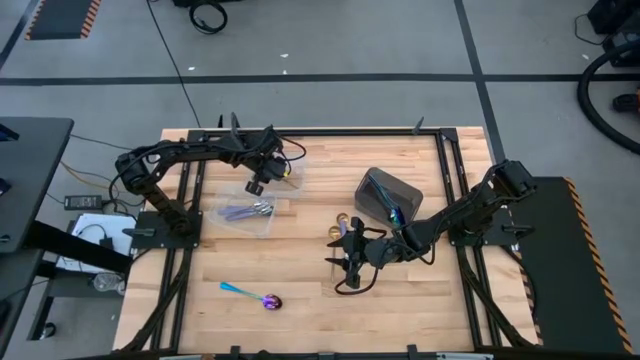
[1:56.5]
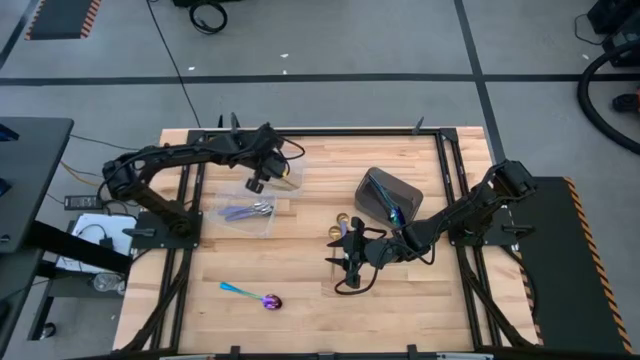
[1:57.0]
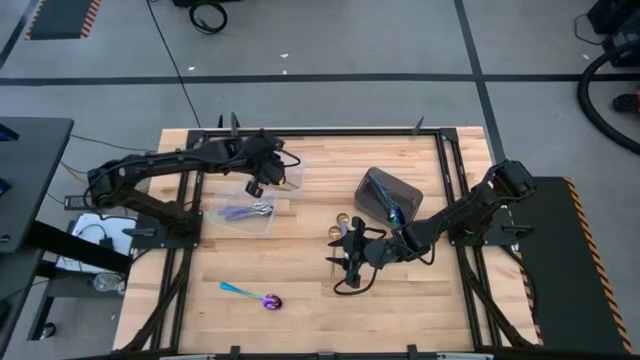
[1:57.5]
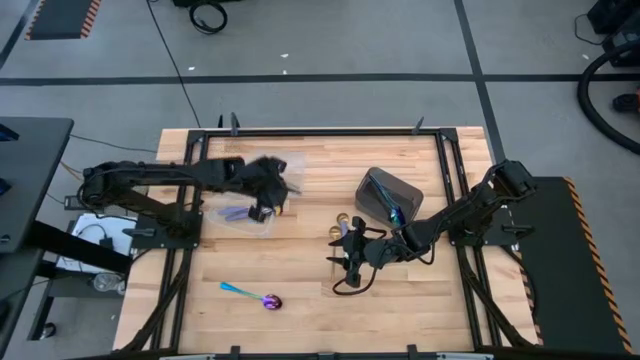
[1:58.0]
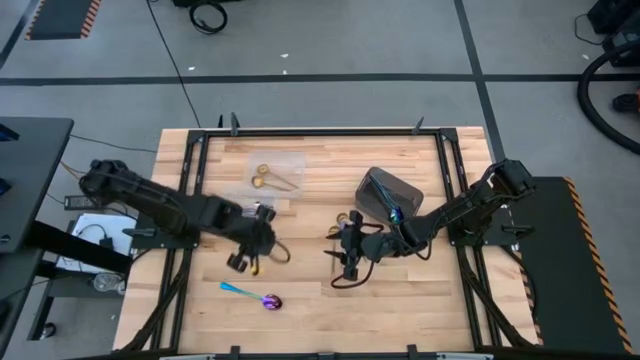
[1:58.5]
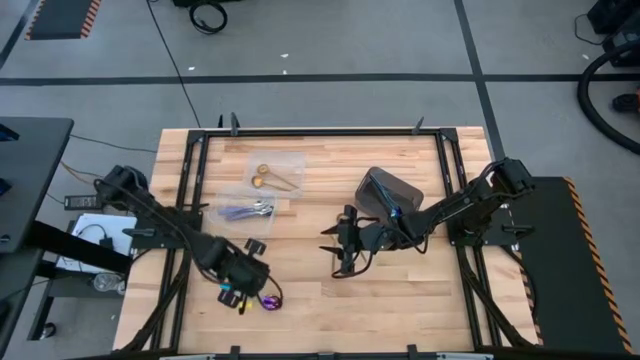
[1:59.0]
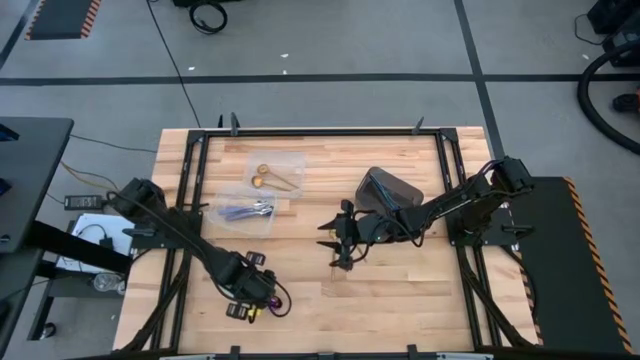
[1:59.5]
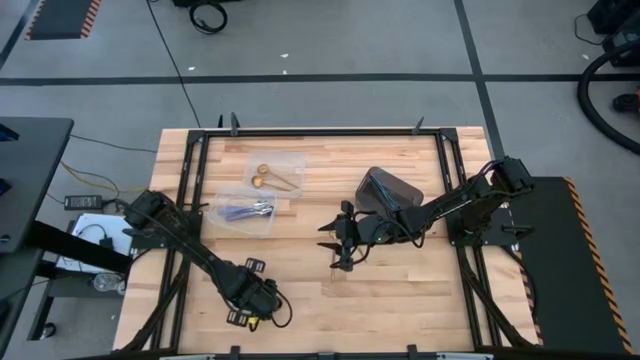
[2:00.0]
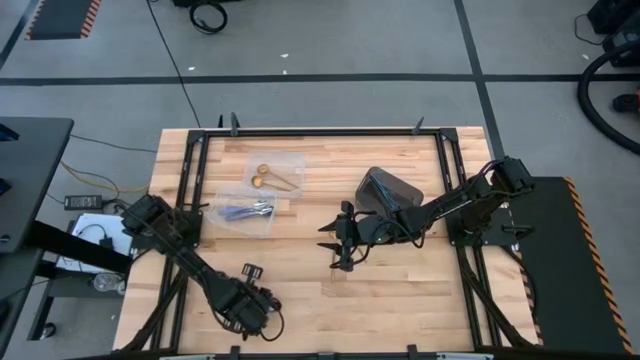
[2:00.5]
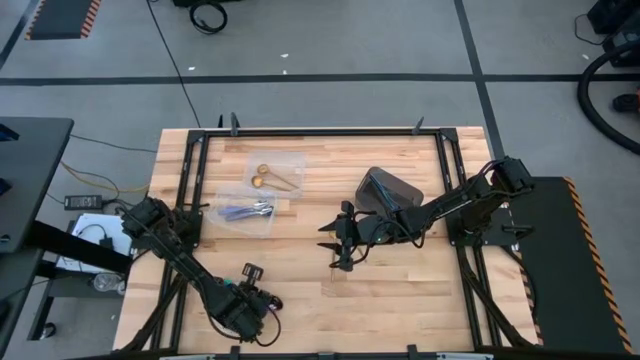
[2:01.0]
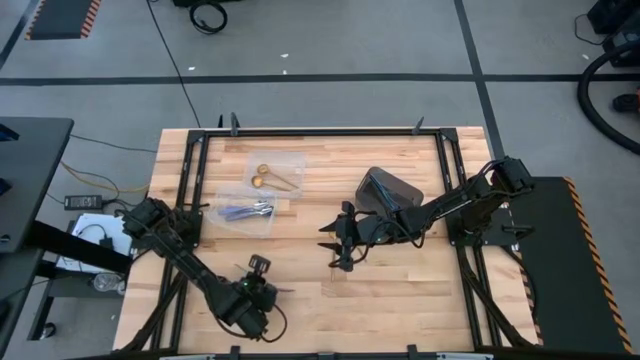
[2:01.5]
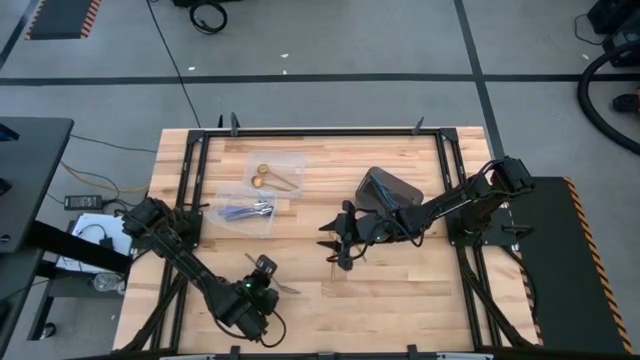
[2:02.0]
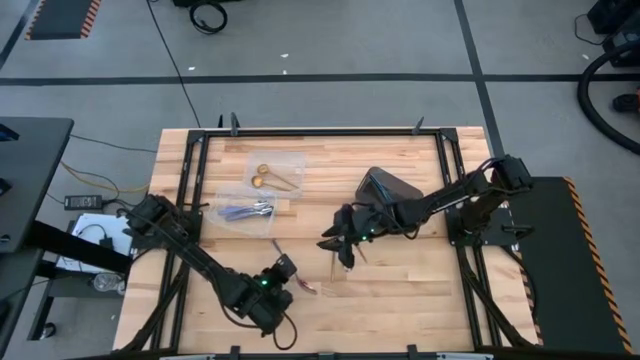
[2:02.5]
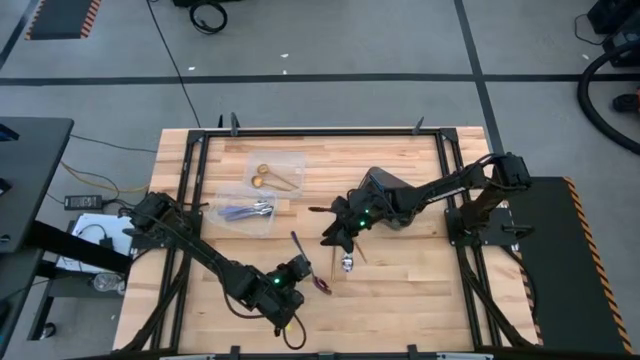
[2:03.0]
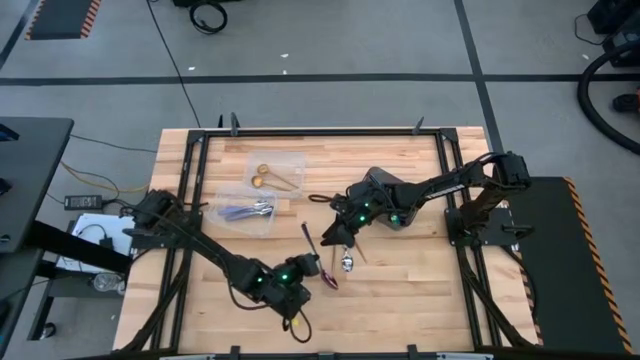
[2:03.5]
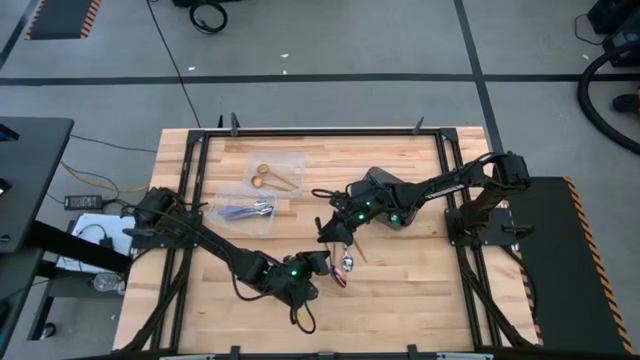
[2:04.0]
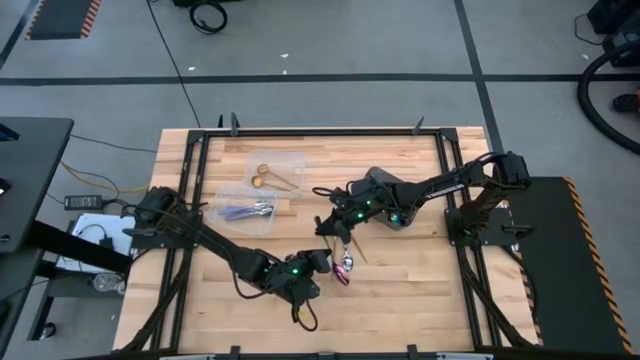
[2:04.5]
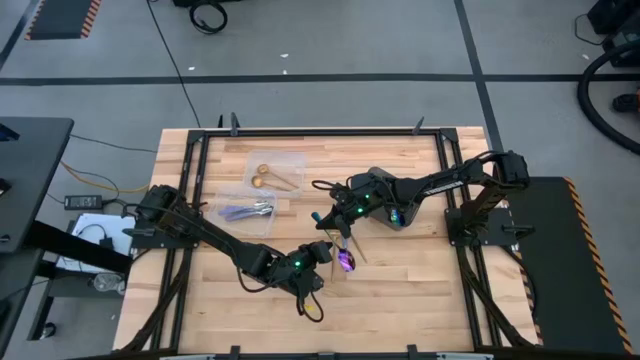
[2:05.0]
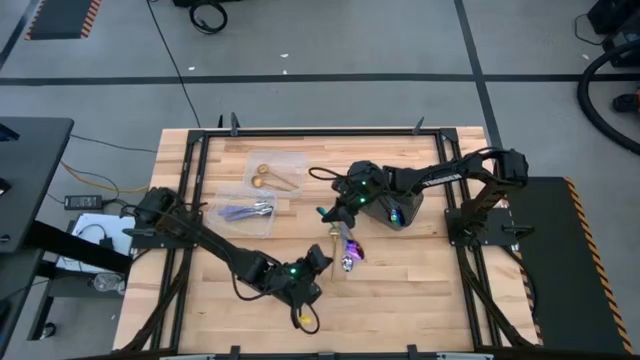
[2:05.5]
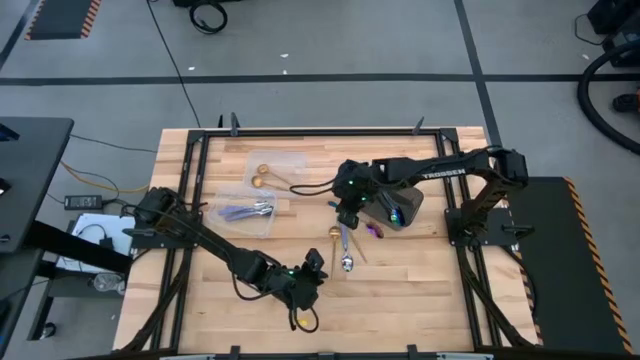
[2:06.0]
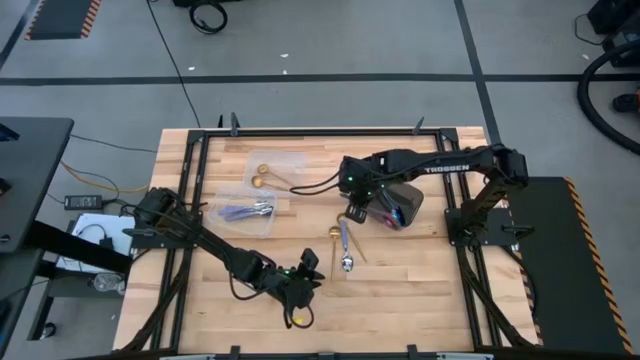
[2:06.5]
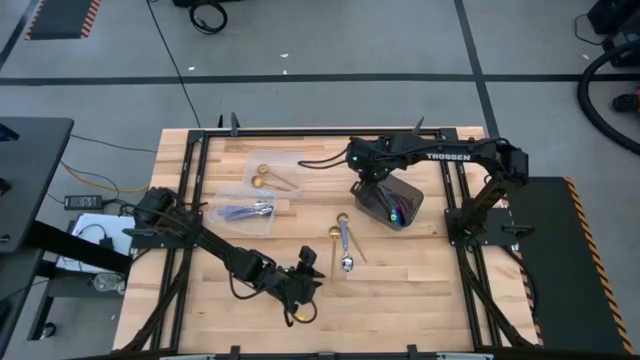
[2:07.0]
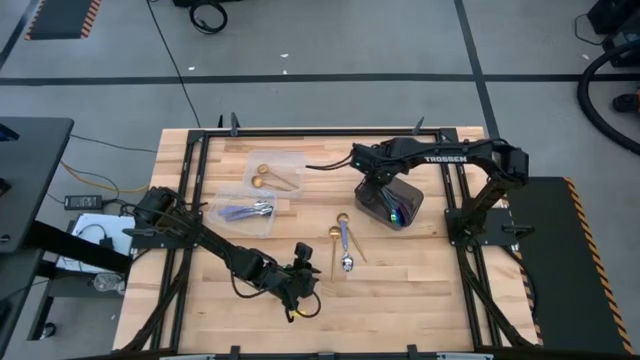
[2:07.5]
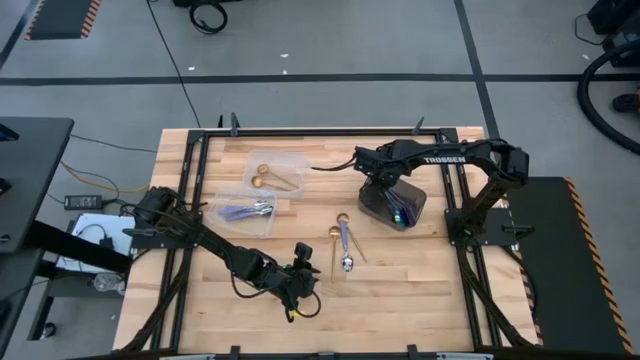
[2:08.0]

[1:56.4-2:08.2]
Task: Sort silverware by color (type)
Put the purple spoon into the black bin

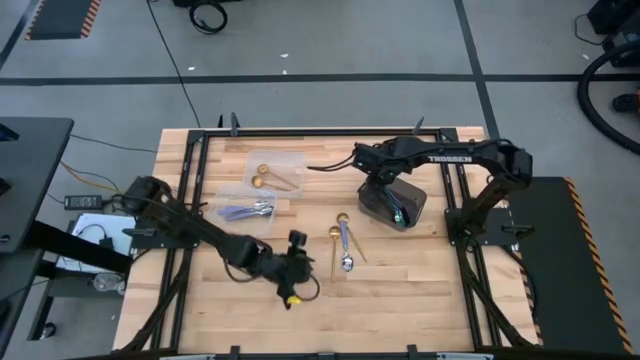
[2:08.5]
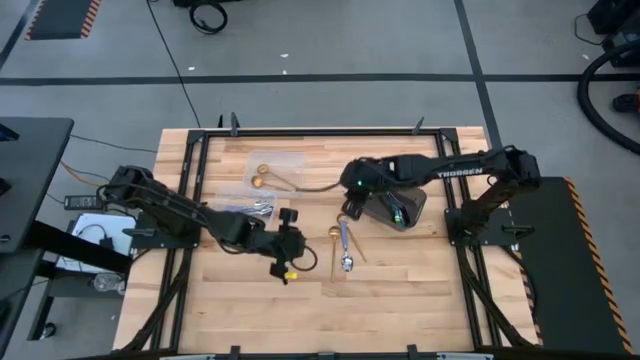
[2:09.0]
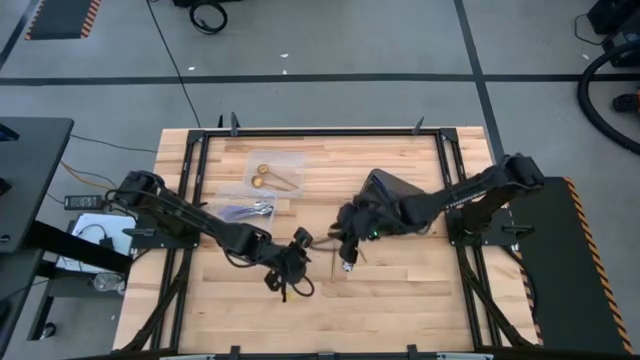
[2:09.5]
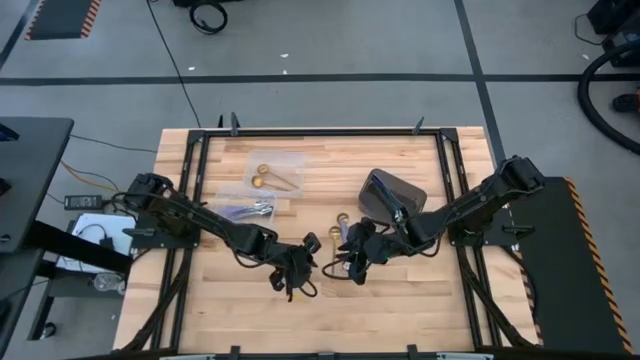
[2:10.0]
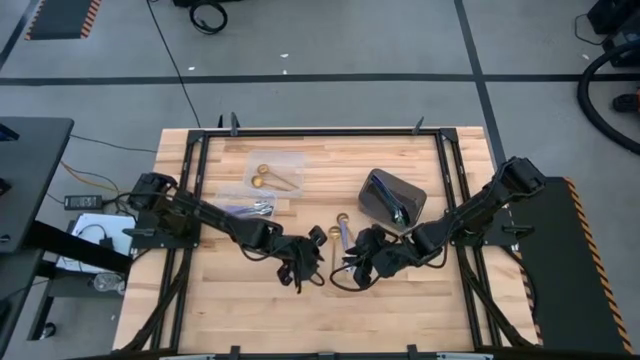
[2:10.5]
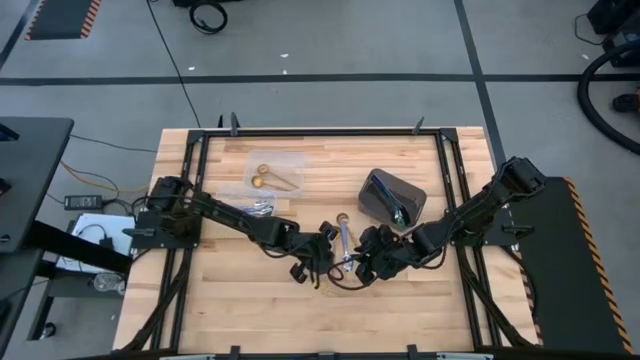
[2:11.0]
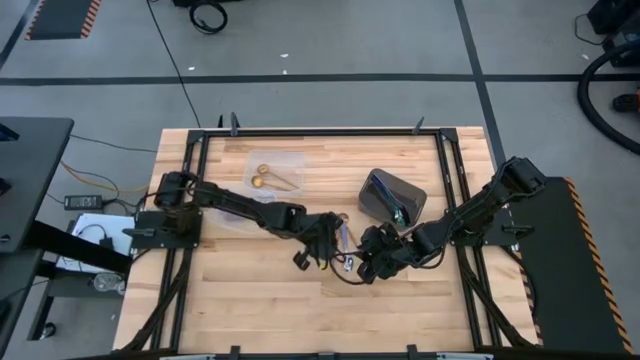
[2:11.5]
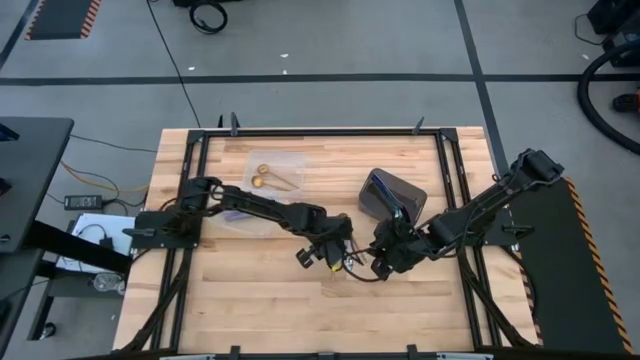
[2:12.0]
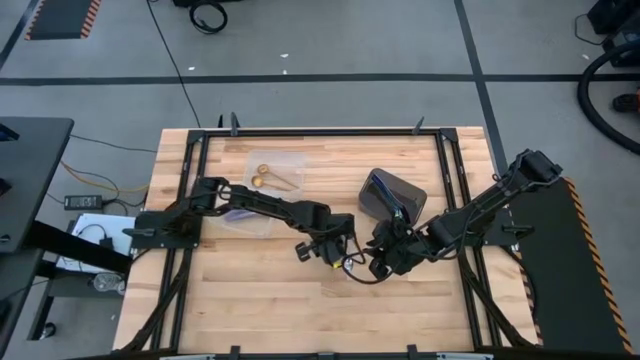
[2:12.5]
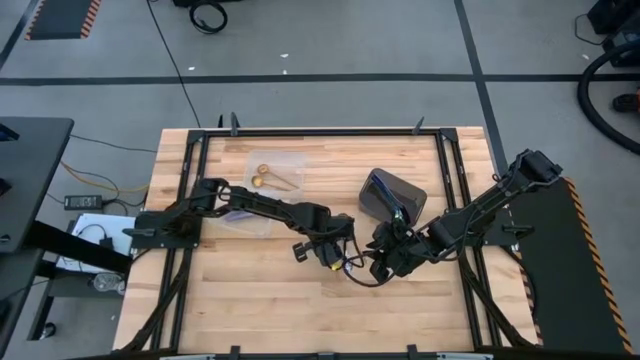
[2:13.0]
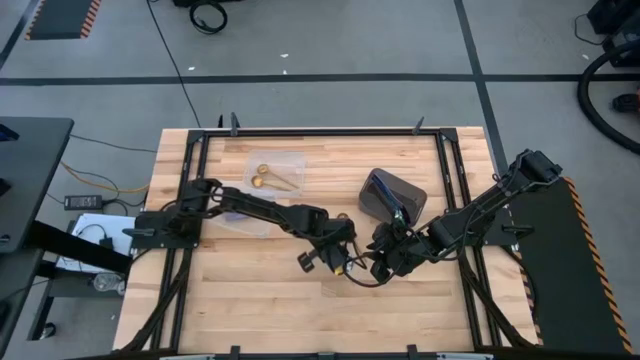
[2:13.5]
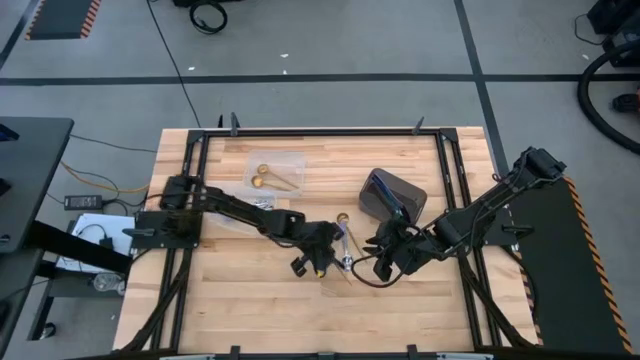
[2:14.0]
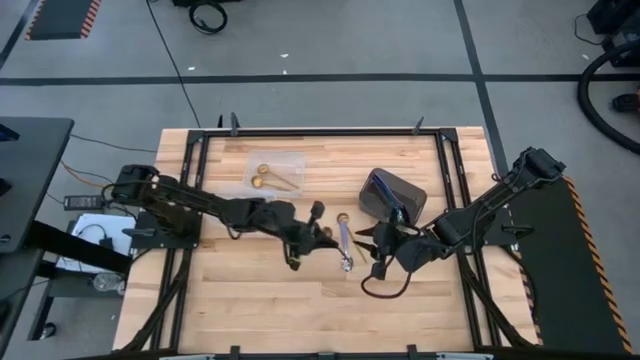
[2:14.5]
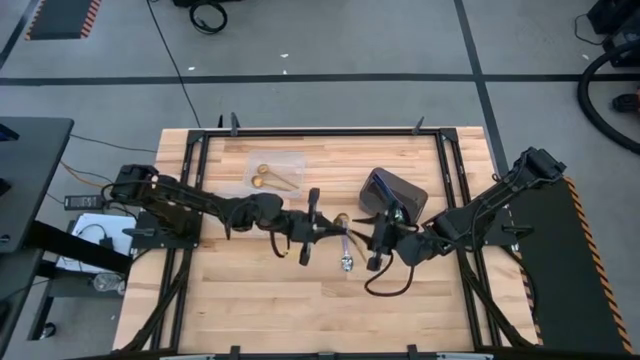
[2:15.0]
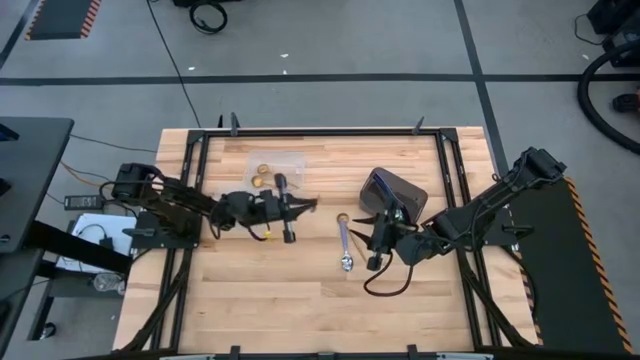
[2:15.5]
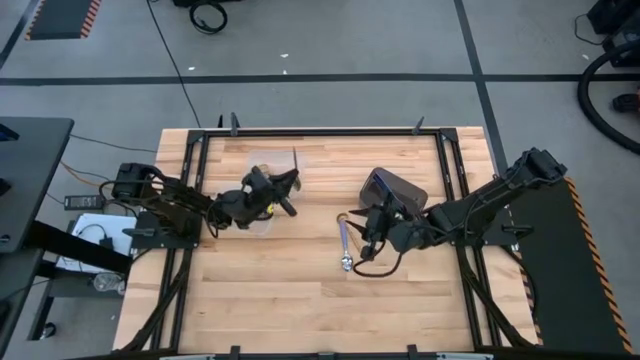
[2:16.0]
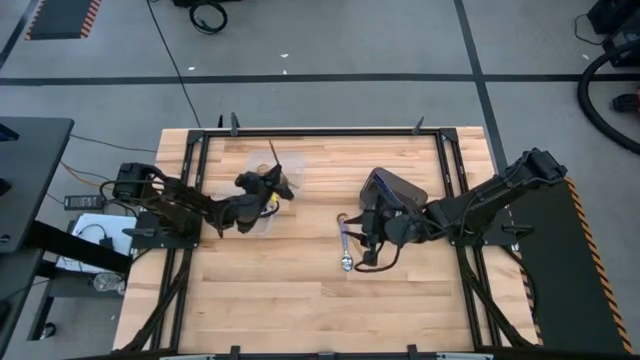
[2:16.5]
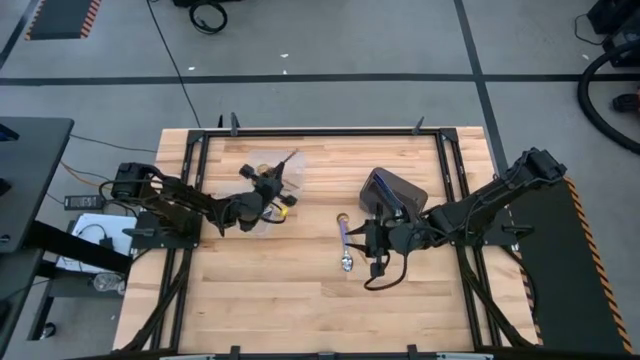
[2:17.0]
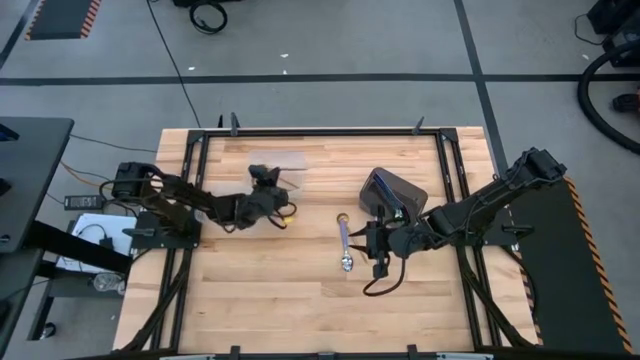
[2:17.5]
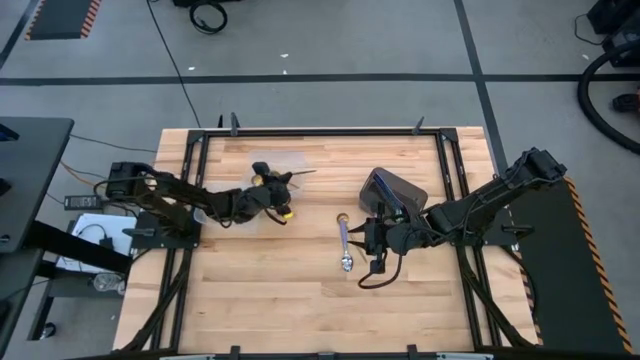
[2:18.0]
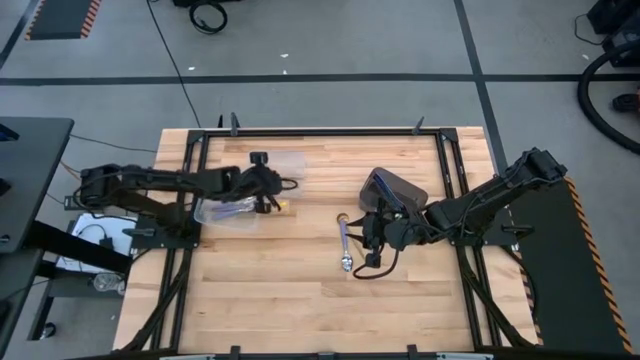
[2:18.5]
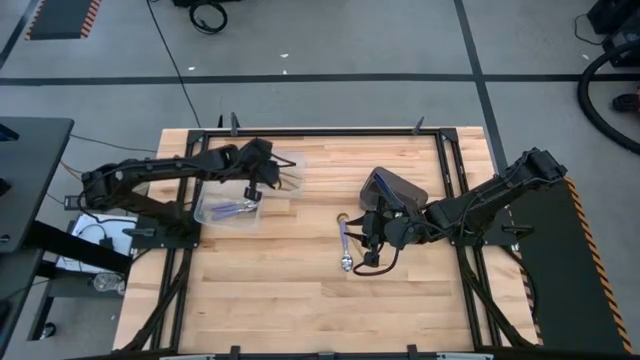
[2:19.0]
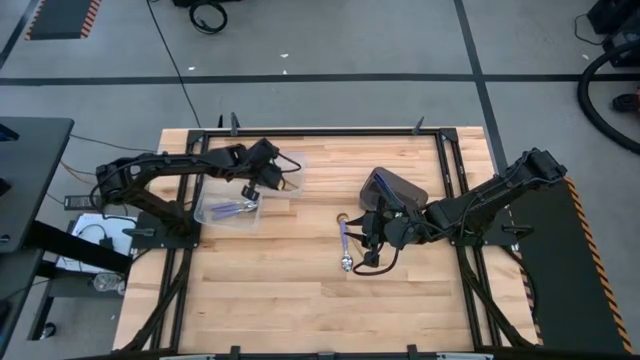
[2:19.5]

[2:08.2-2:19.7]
Put the gold spoon into the top transparent bin
